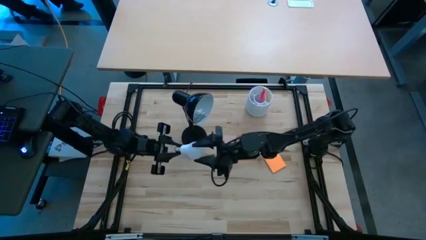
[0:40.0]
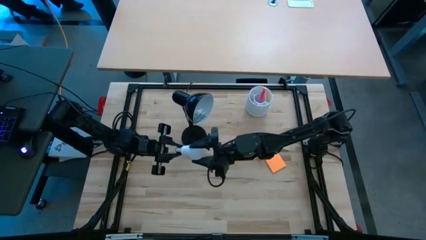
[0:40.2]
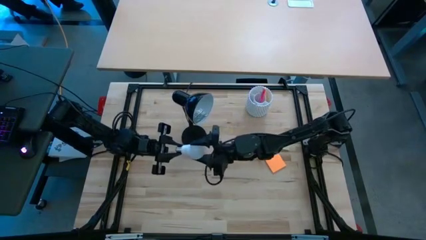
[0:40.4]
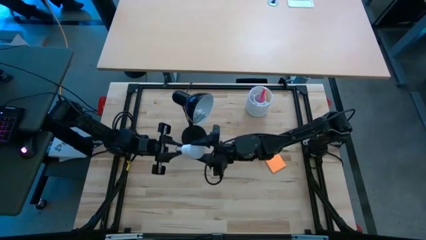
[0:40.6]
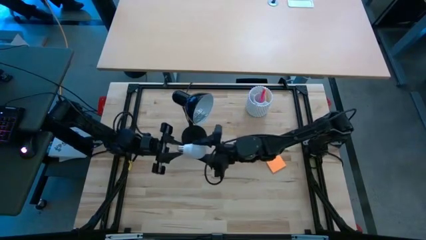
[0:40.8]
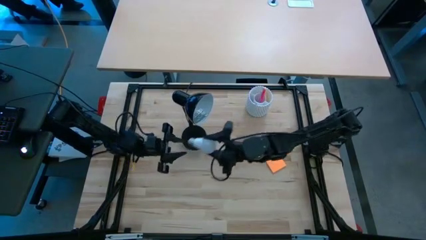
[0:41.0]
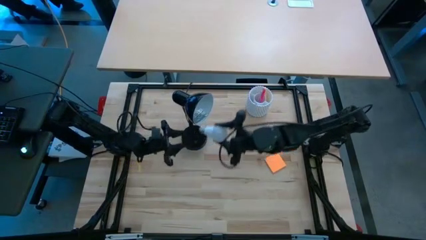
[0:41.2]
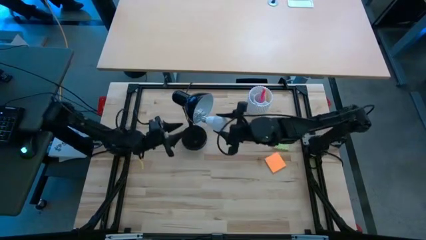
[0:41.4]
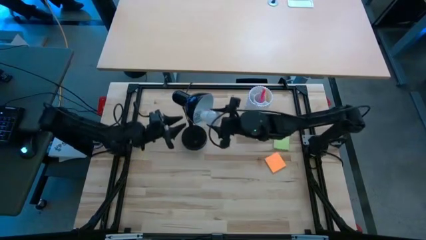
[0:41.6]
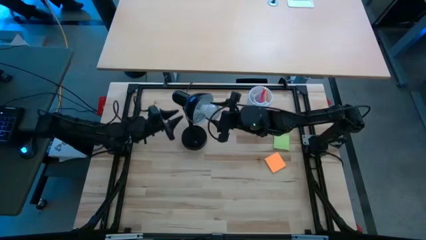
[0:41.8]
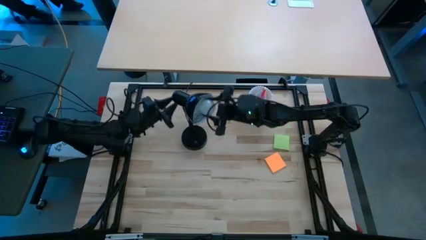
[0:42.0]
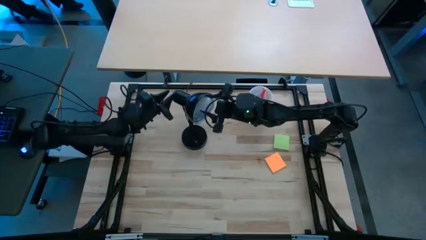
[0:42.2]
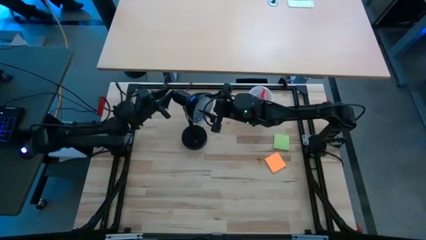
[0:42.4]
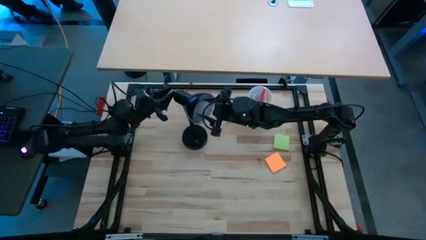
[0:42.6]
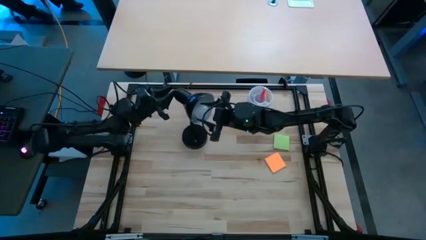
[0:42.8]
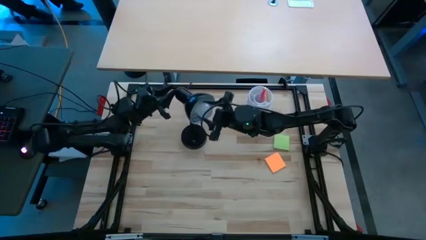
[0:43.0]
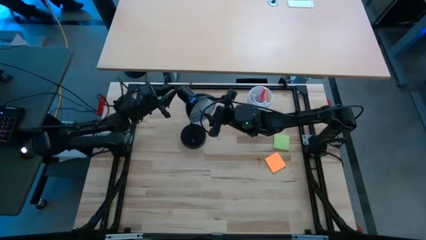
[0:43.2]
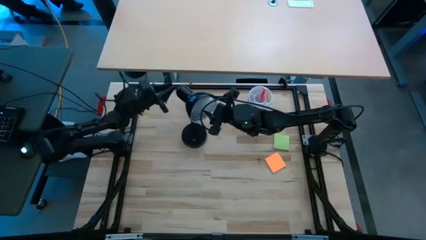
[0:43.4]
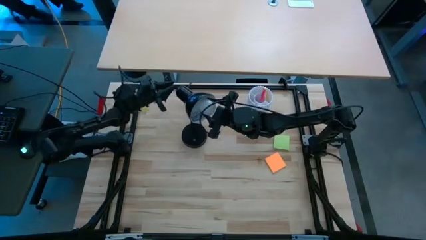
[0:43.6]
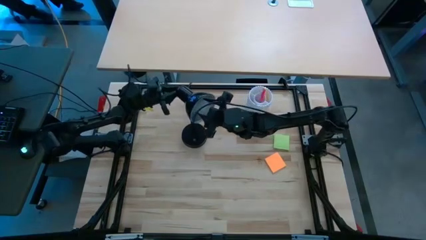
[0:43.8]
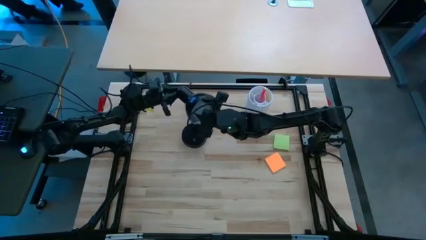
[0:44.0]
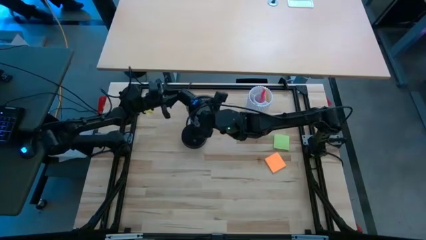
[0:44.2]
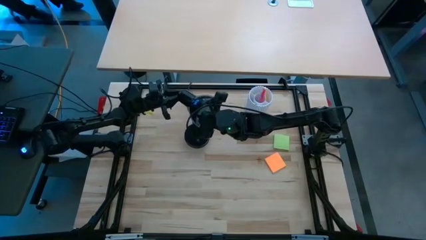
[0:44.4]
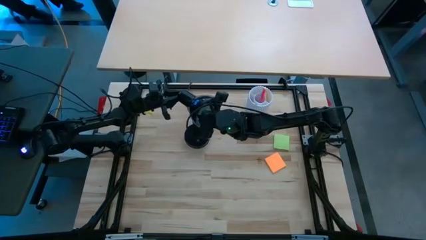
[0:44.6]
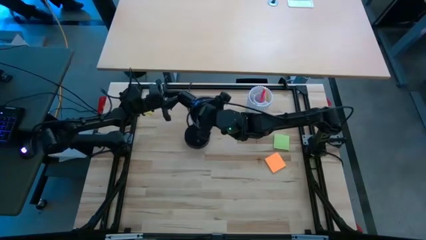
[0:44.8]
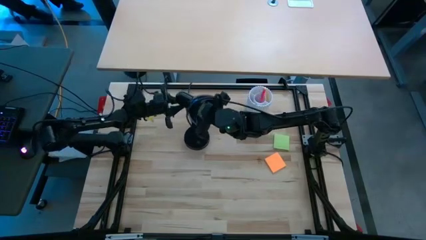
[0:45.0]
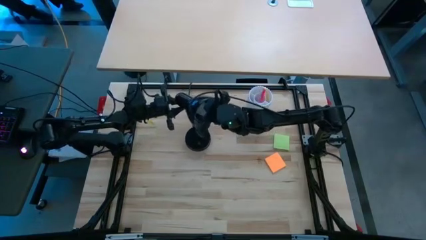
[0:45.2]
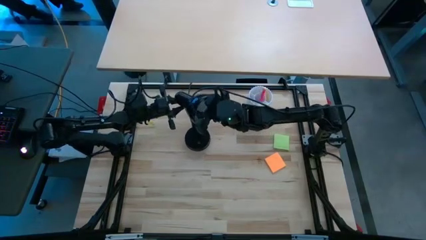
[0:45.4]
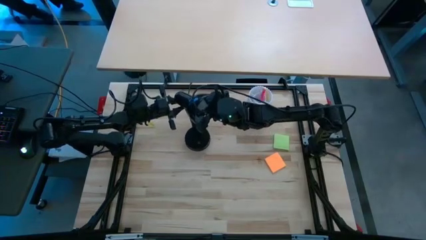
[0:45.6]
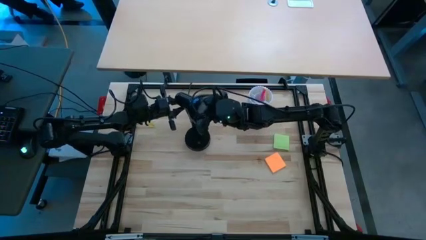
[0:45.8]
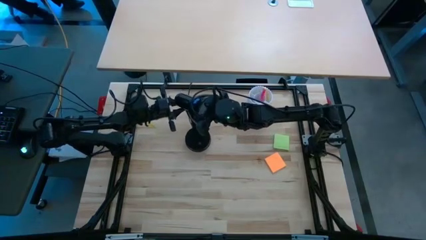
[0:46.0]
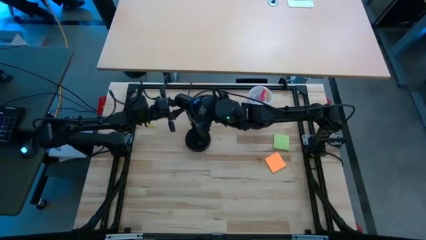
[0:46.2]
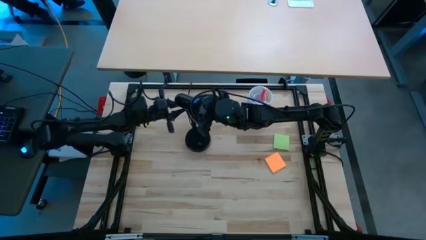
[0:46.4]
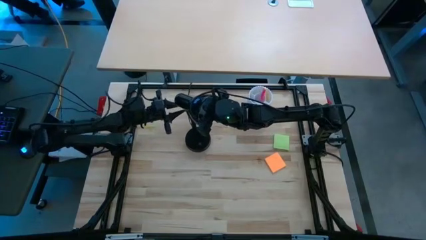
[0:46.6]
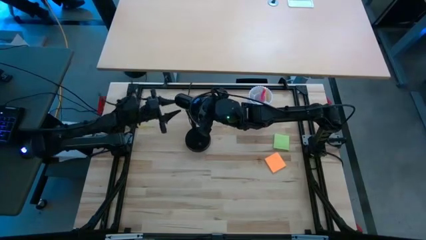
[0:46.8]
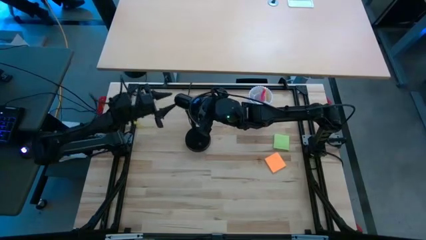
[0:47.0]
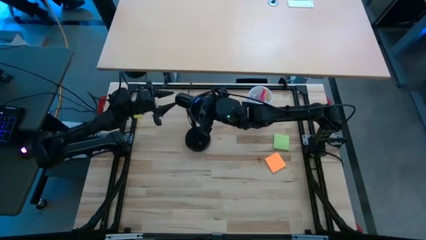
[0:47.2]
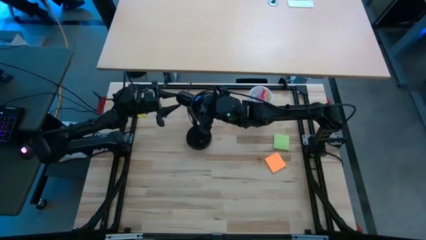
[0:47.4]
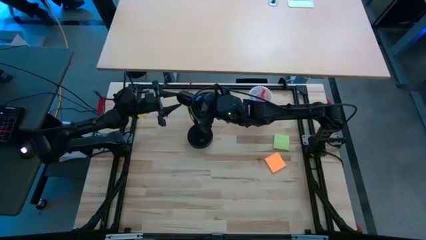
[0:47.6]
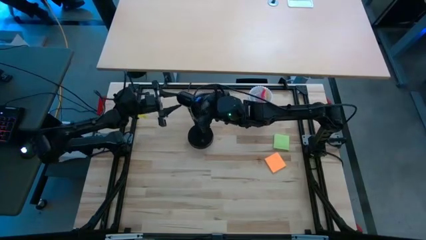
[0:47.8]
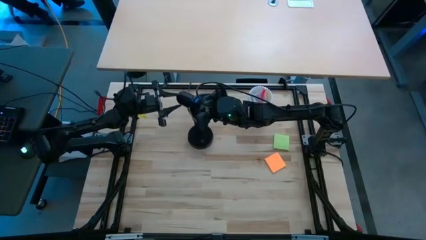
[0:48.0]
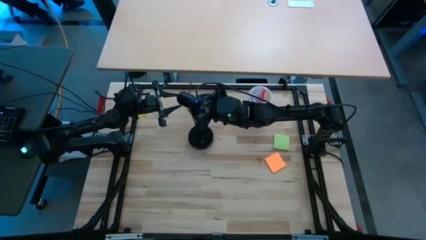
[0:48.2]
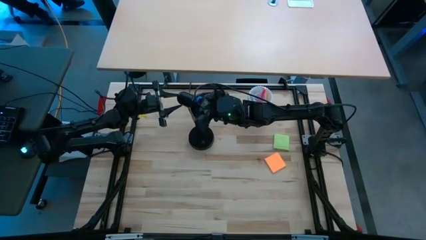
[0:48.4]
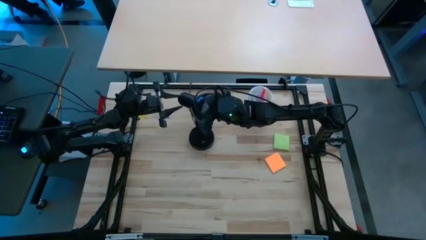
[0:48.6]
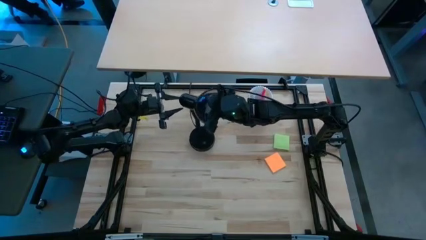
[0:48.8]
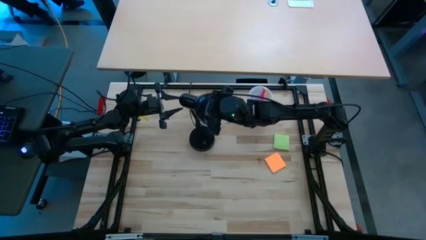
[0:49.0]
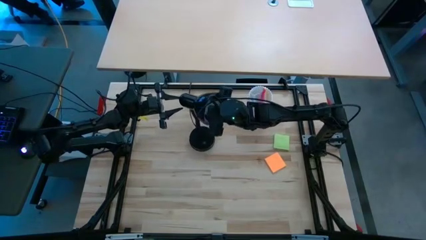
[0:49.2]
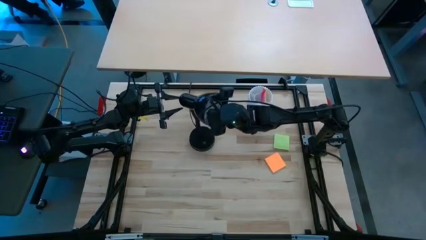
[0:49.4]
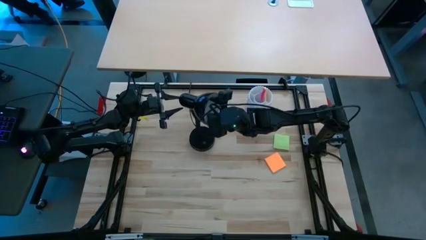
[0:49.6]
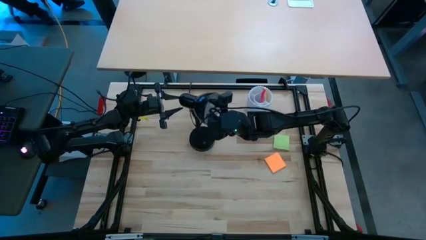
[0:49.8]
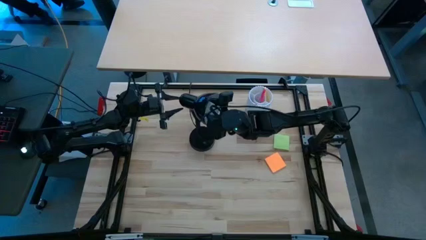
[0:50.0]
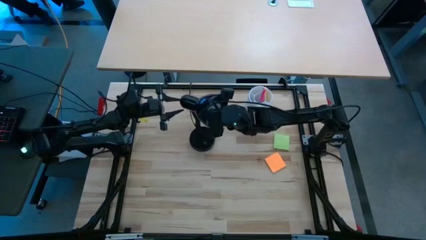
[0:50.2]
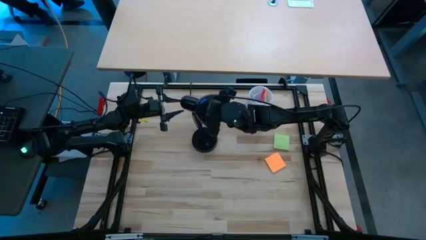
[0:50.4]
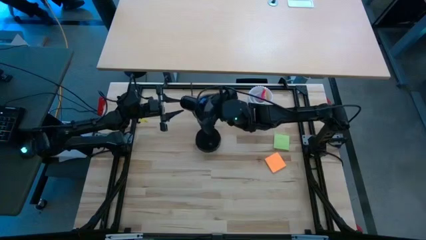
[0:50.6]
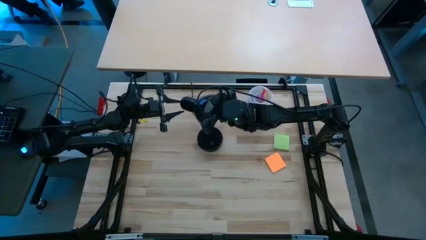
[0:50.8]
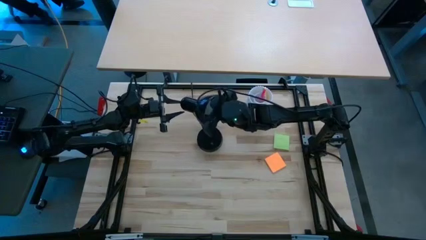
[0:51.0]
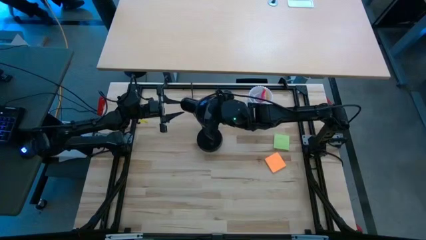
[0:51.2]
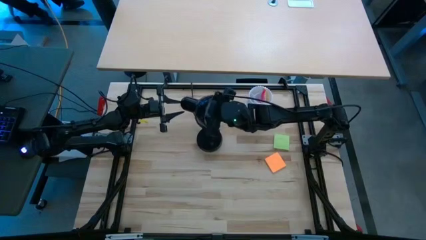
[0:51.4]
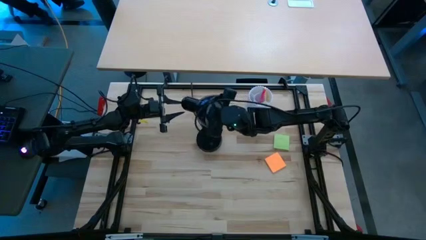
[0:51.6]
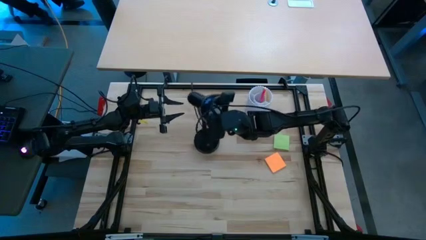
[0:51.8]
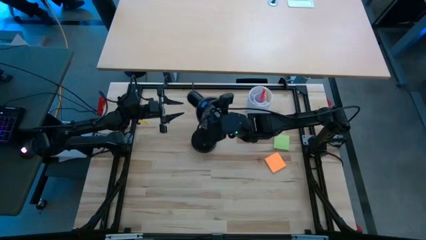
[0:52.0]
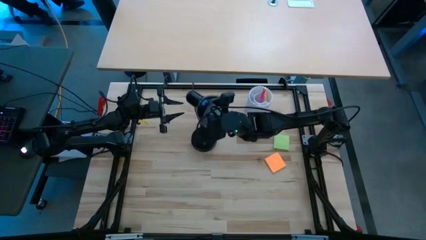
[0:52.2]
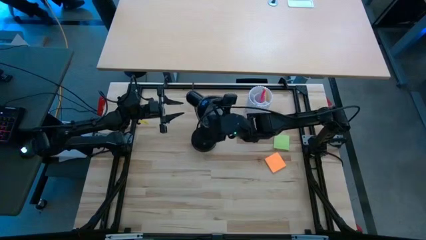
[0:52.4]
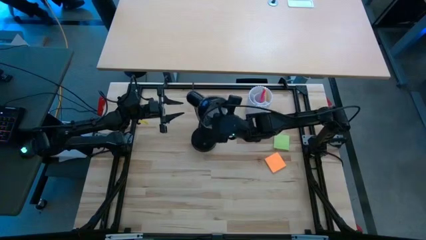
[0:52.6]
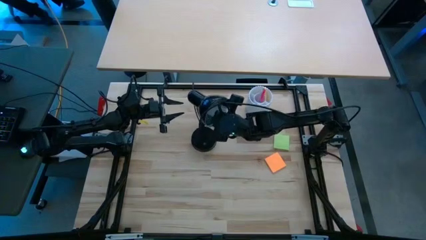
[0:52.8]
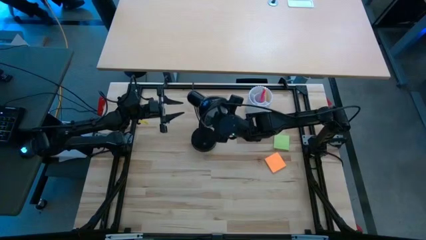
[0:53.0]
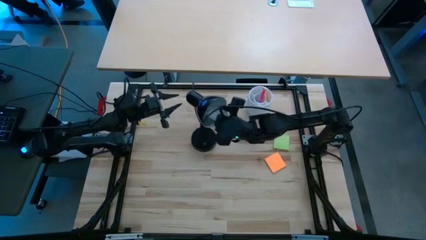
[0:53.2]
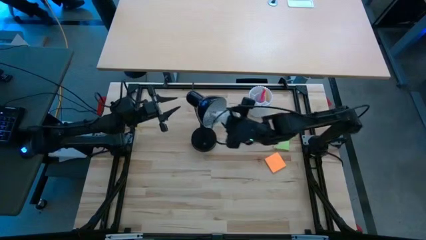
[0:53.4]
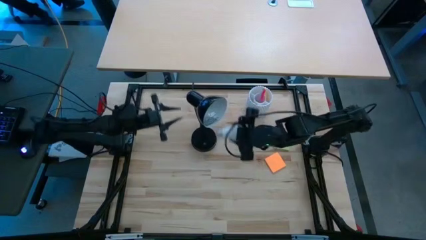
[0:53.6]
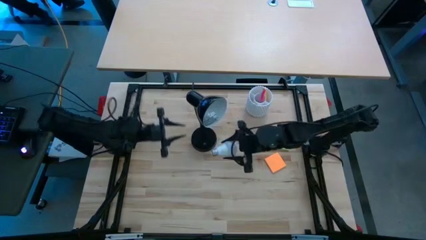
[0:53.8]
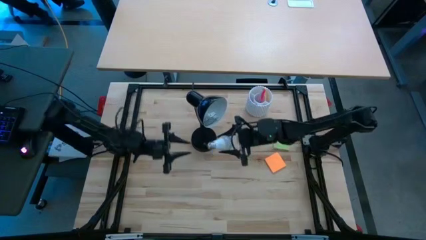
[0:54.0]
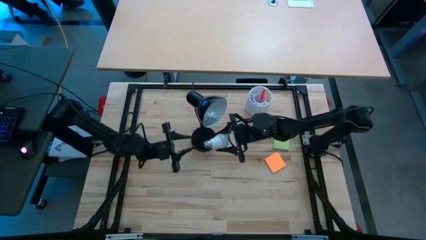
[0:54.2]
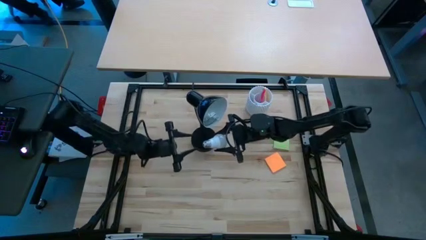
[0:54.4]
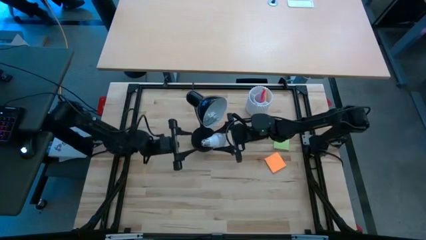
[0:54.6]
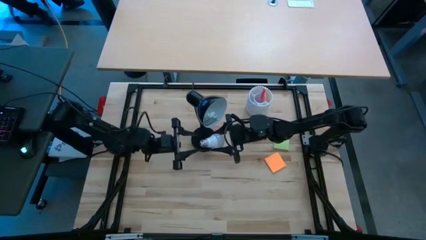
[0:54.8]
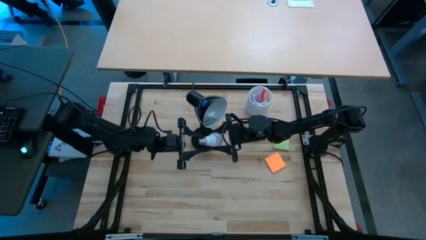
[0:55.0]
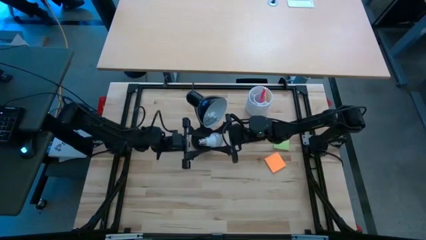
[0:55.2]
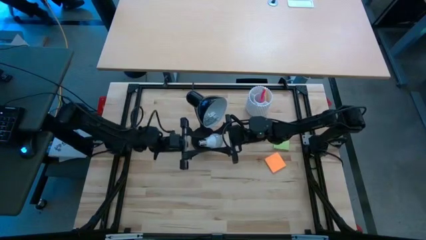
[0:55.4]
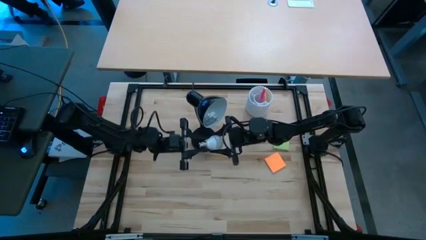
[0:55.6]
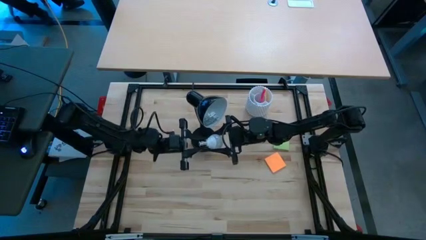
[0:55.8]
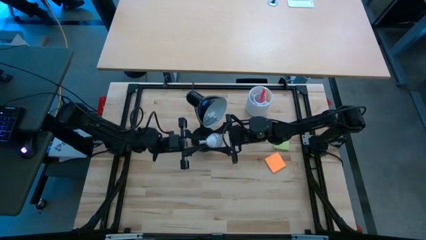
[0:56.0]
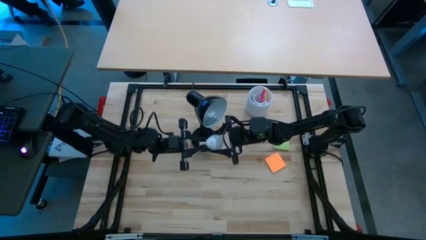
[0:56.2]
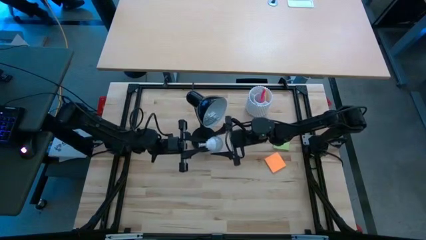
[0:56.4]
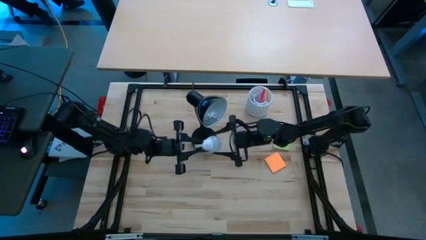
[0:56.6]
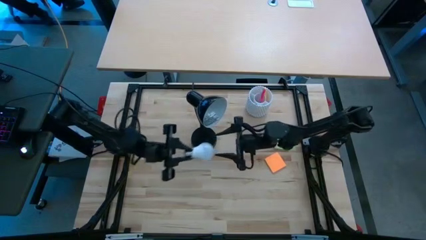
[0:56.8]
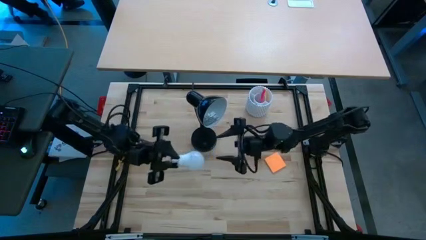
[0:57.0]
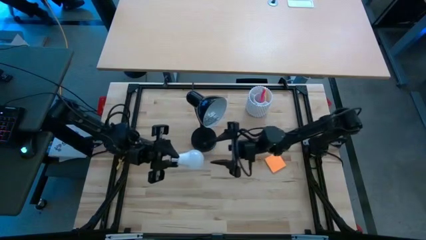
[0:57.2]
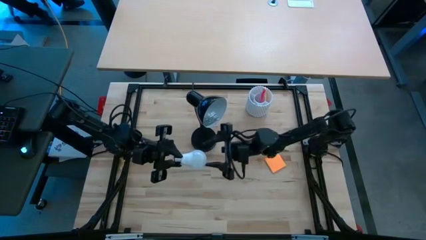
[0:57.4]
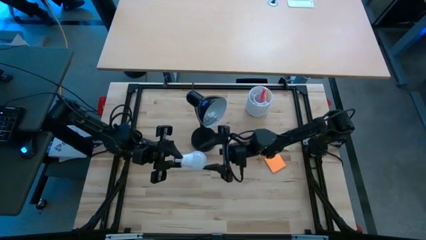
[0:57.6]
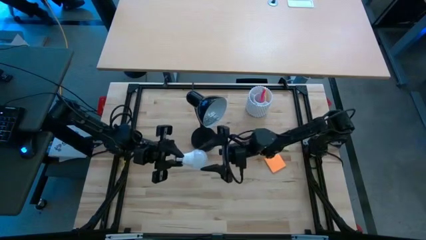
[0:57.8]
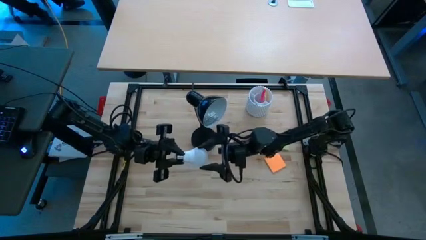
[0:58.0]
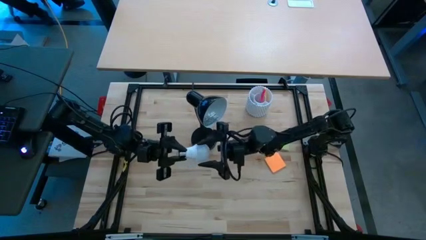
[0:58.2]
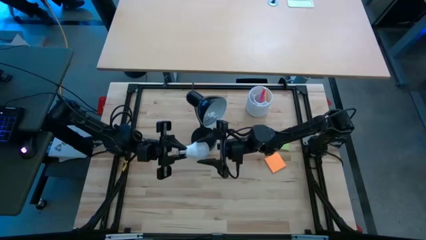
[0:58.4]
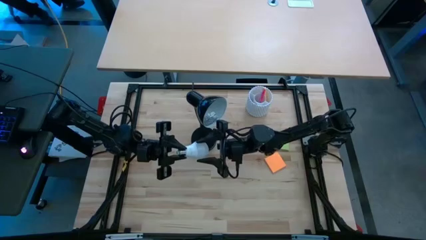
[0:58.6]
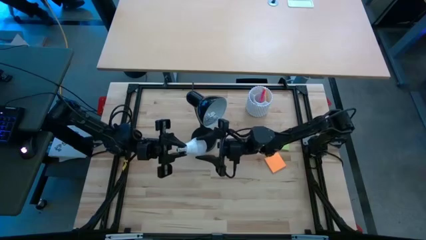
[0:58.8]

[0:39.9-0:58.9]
Task: Screw lightbulb
Insert the white lightbulb into the black lamp
